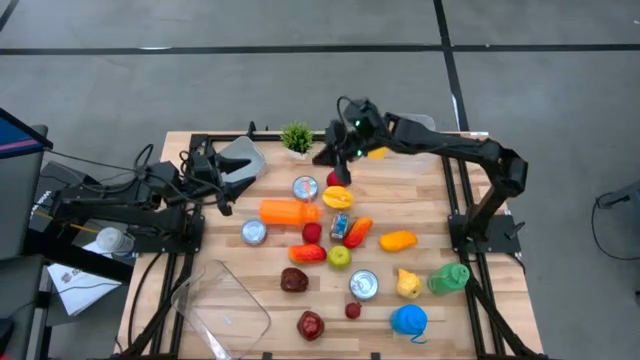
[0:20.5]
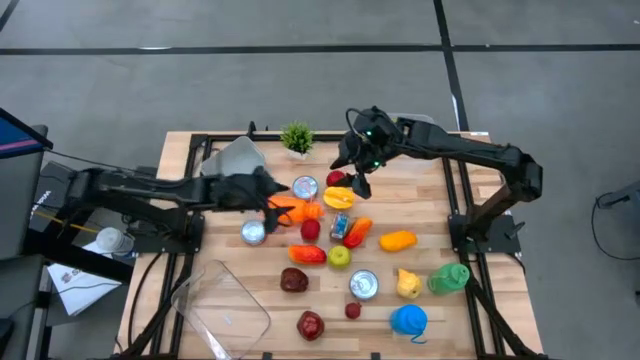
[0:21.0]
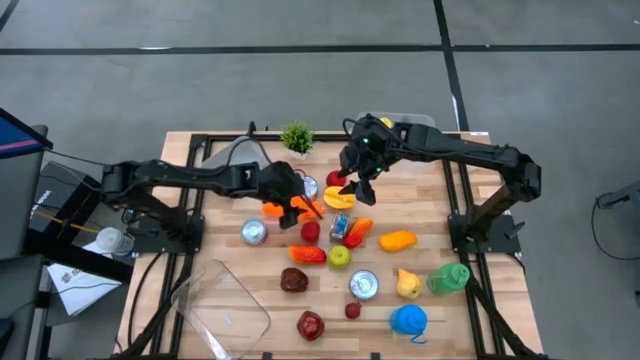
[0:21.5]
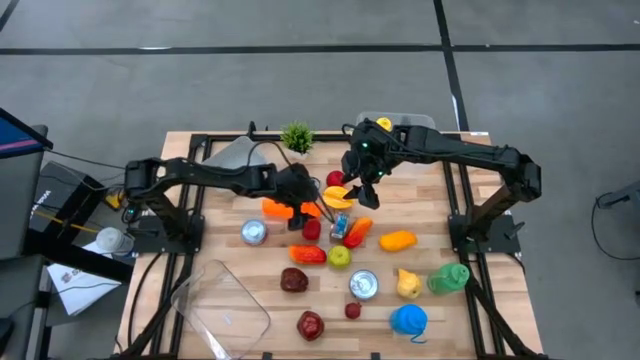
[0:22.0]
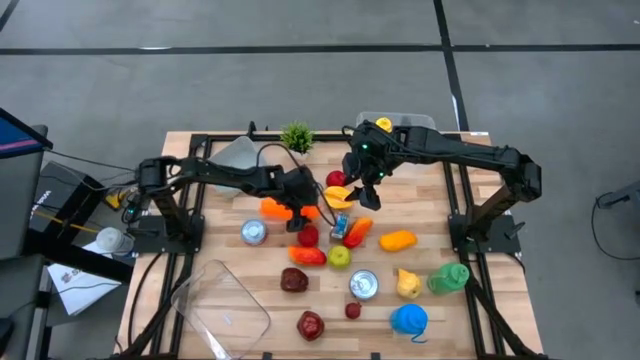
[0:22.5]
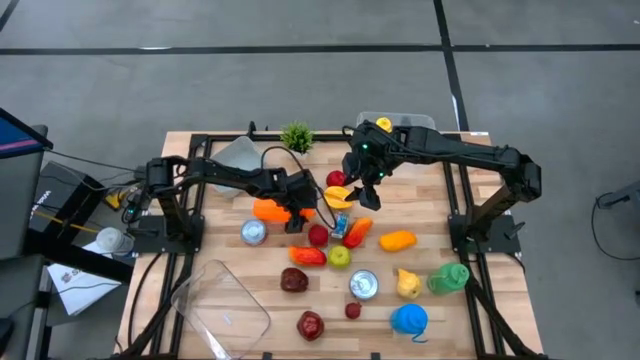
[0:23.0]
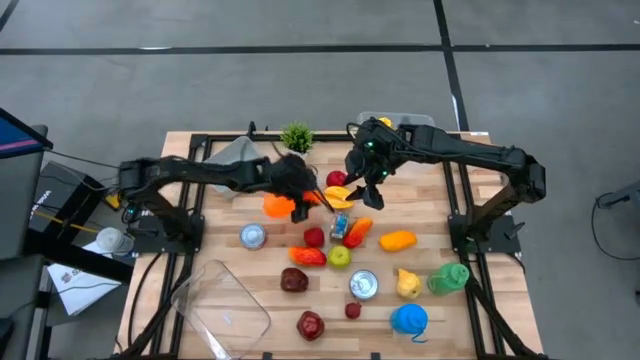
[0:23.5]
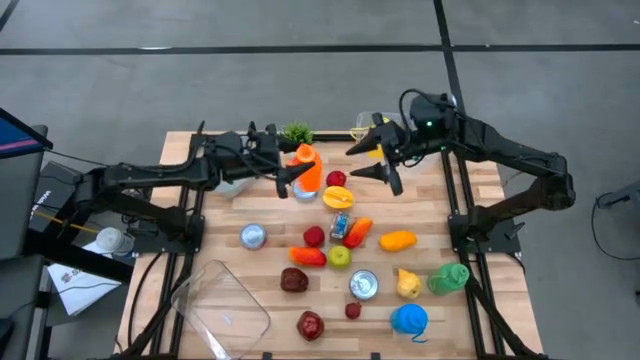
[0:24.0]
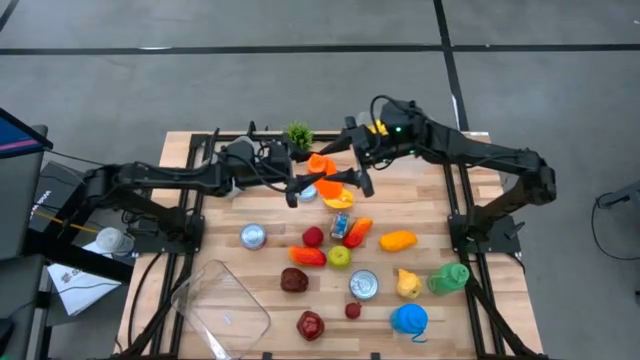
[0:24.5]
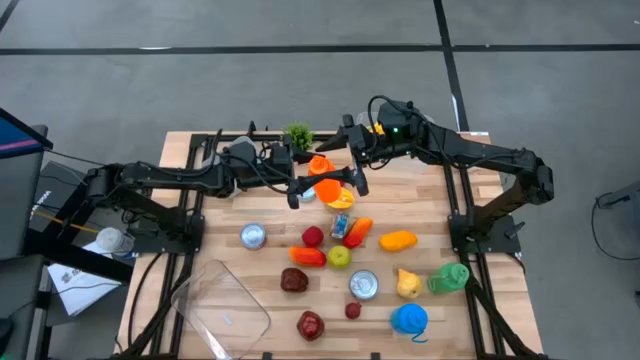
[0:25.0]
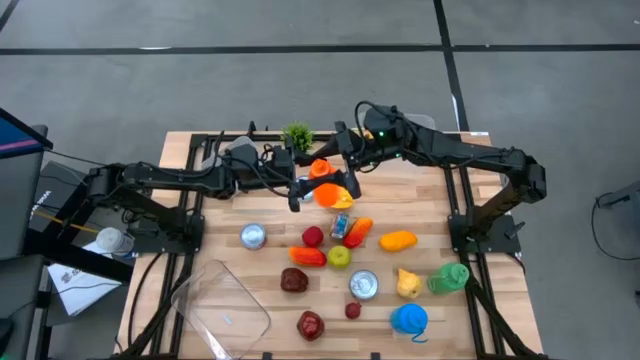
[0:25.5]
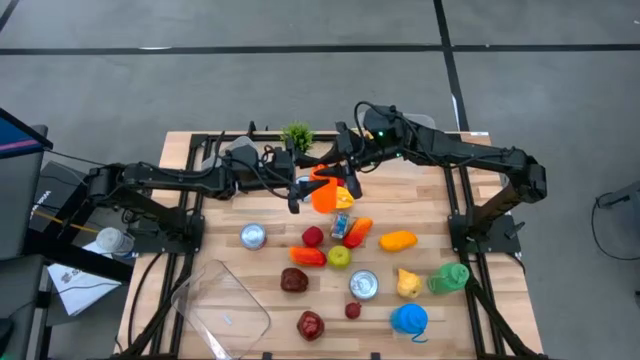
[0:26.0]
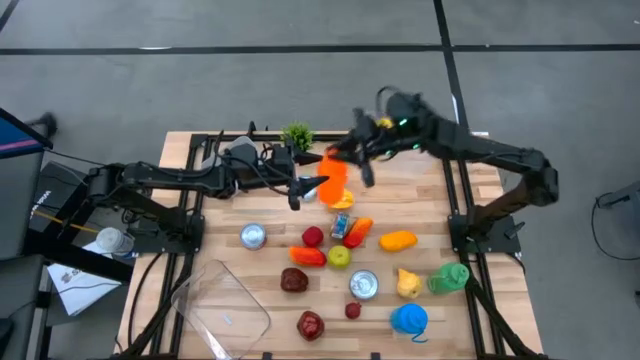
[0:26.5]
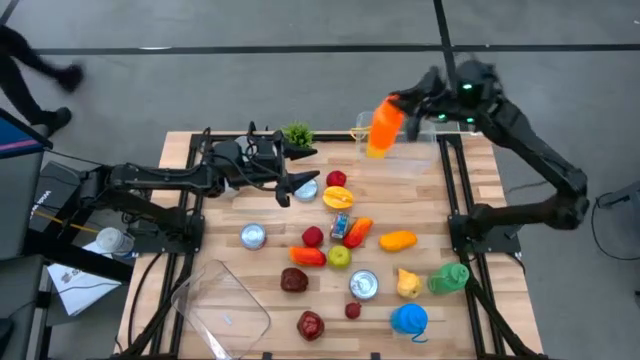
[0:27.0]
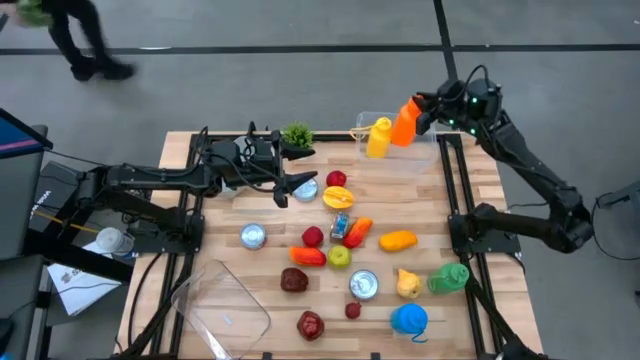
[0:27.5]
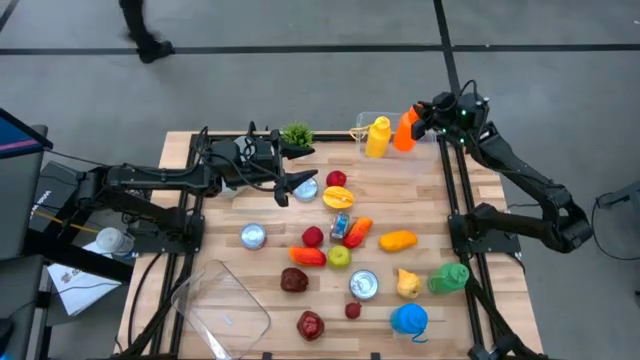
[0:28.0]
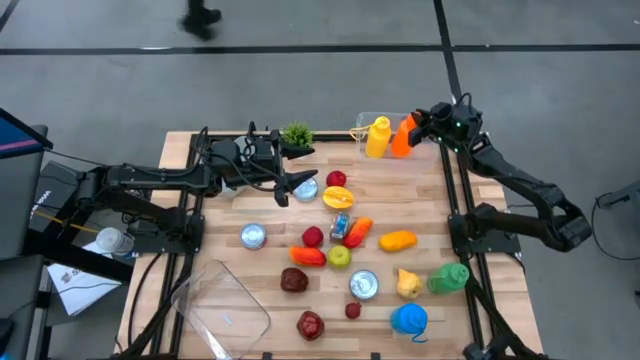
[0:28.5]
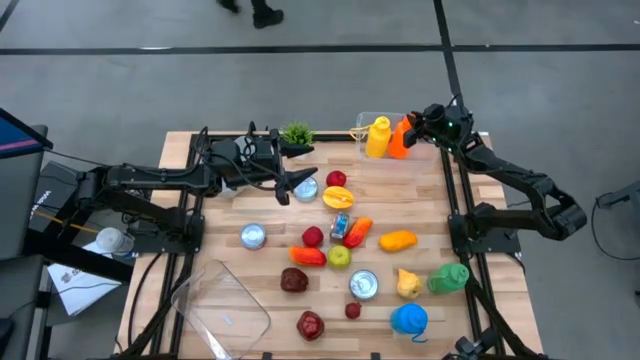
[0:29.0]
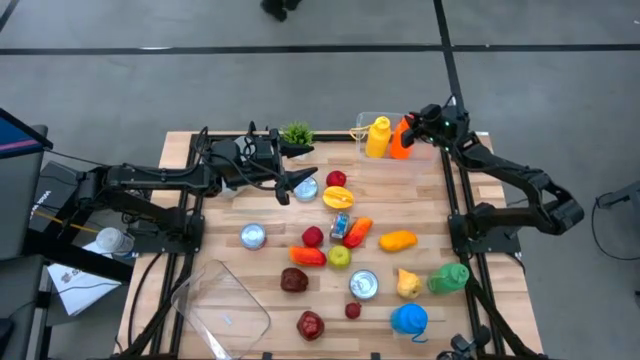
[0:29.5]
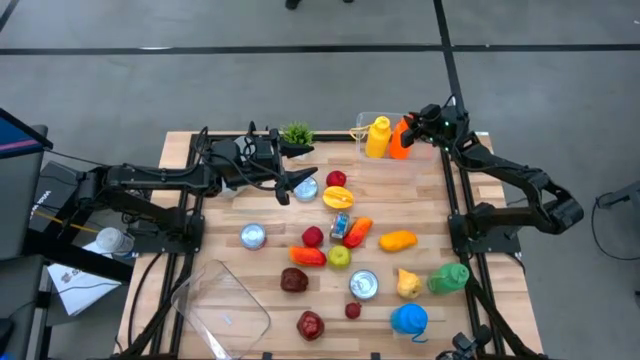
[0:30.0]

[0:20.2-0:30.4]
Task: Pick & Place Food Item
Put the orange tumbler into the top transparent bin

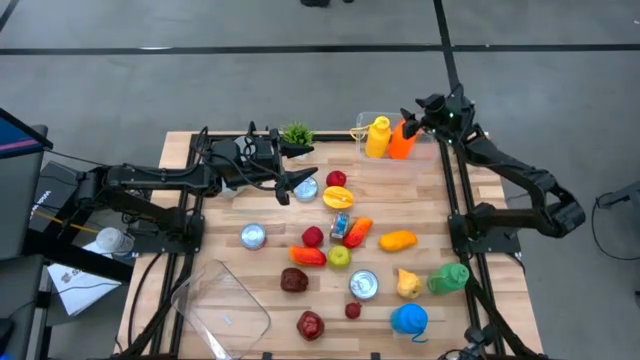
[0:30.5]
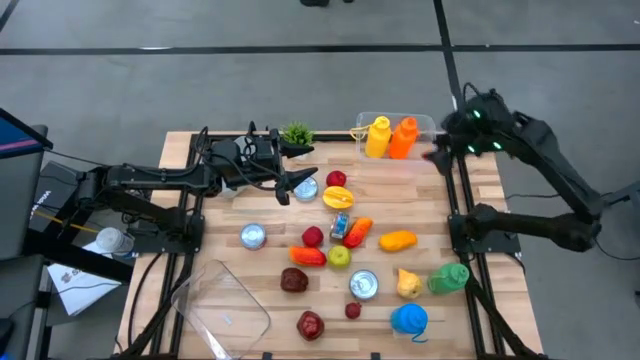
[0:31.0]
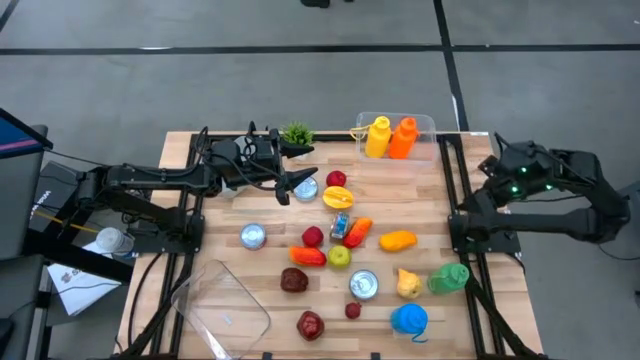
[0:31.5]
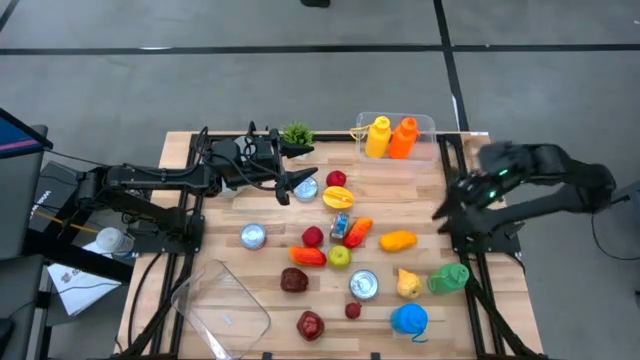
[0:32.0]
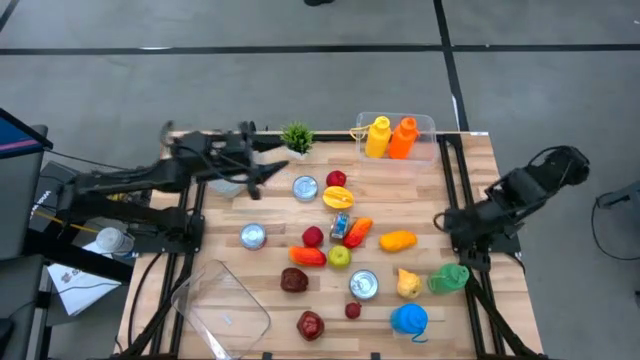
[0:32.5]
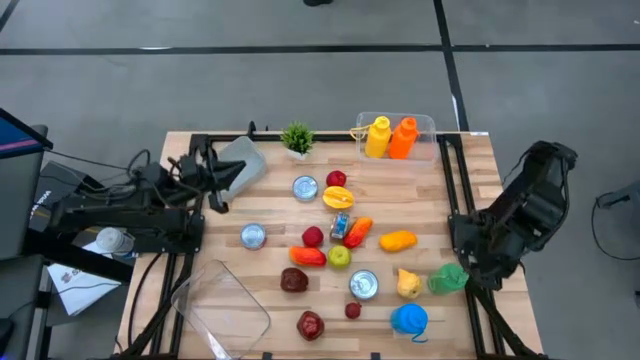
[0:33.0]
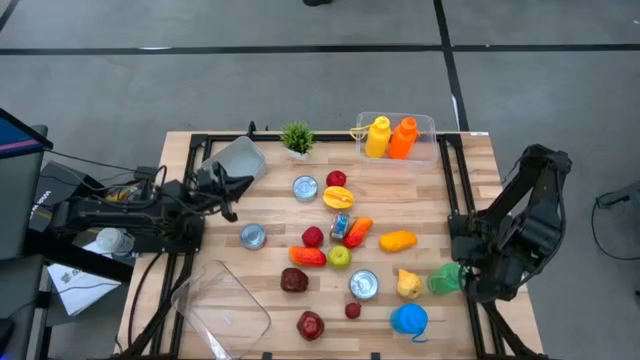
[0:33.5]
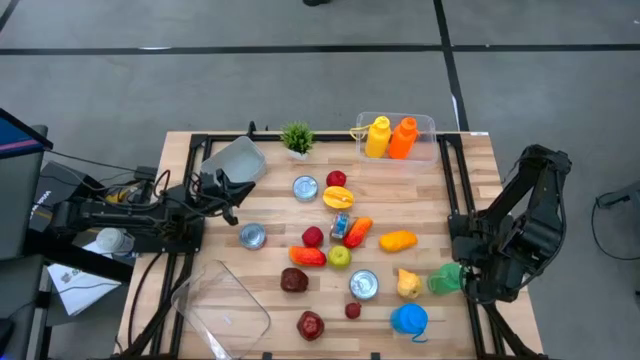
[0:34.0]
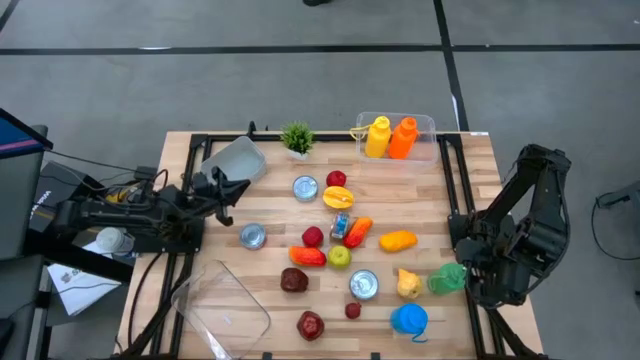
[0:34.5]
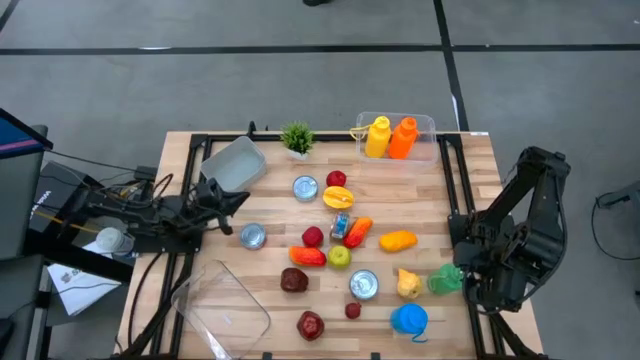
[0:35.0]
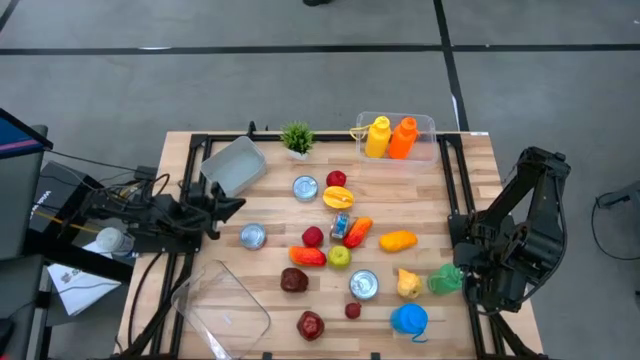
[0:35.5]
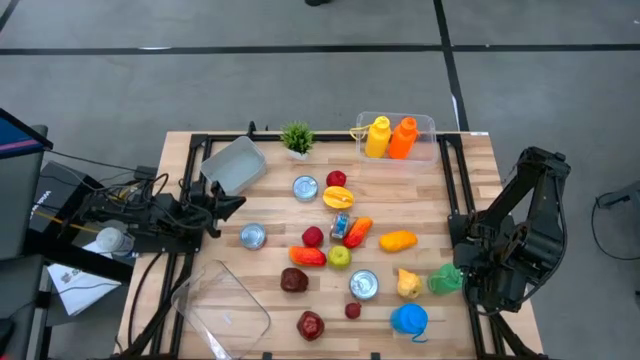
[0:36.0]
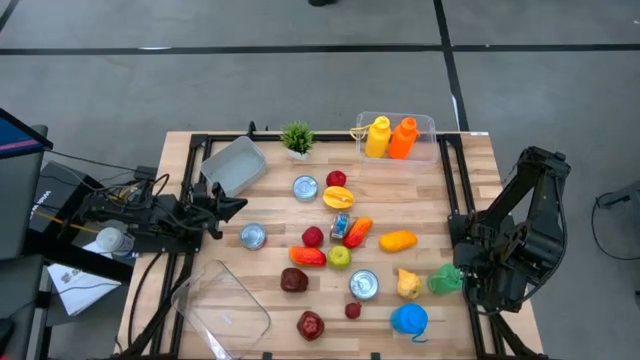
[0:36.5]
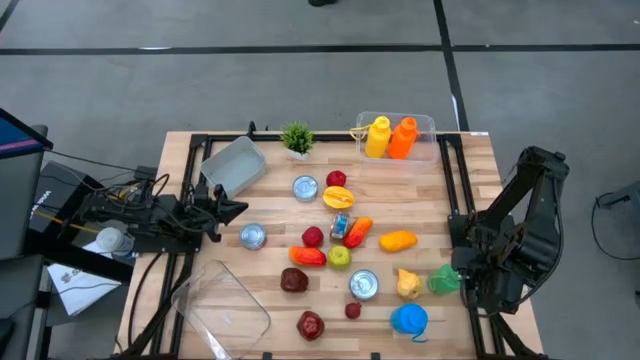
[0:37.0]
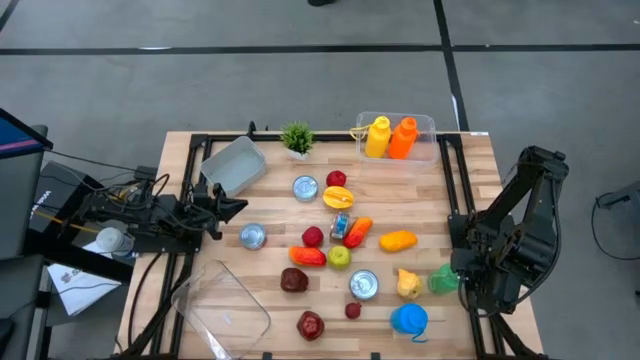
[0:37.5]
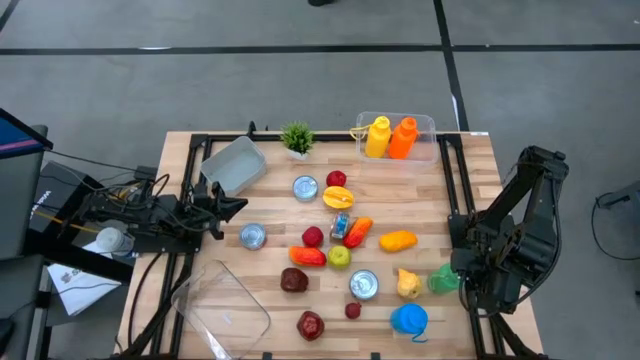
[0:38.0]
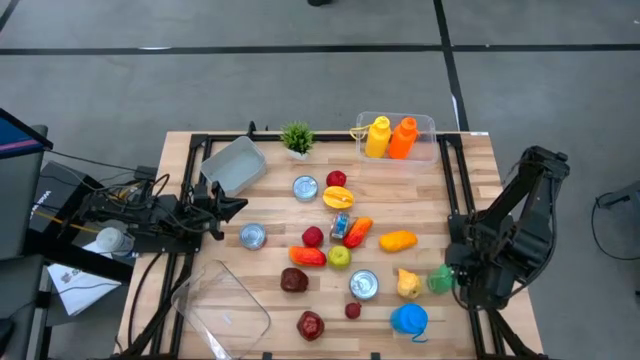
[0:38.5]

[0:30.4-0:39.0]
Put the green tumbler into the top transparent bin
